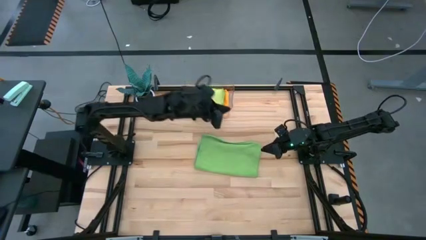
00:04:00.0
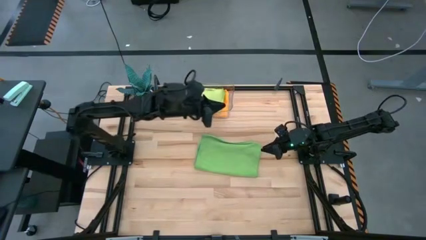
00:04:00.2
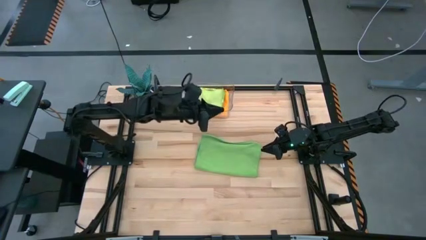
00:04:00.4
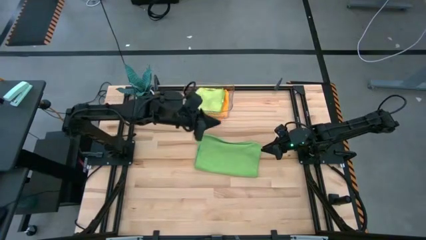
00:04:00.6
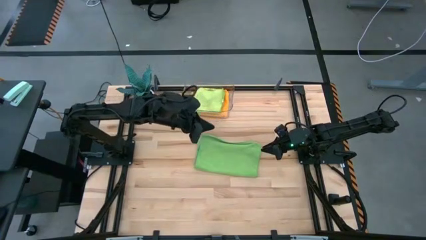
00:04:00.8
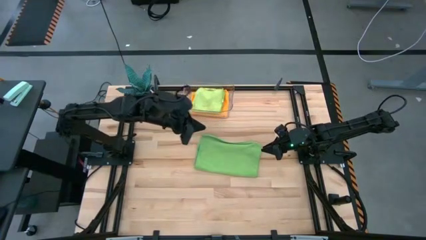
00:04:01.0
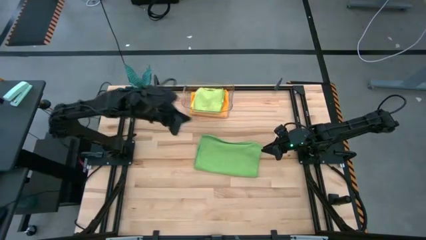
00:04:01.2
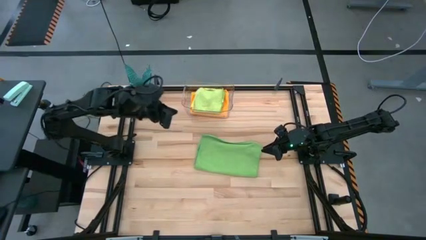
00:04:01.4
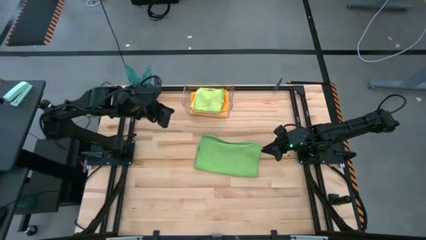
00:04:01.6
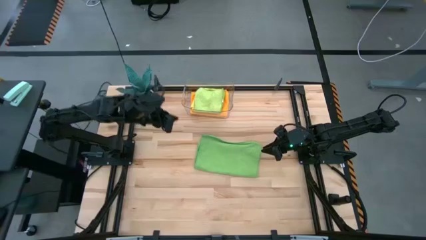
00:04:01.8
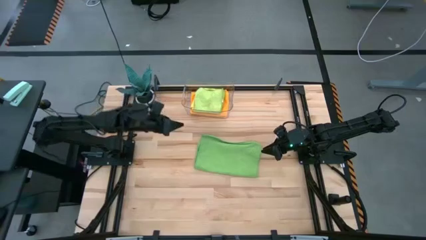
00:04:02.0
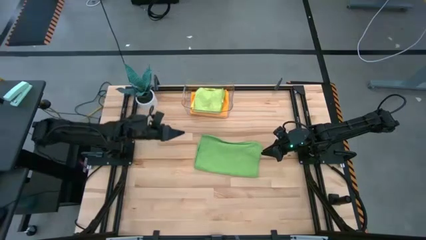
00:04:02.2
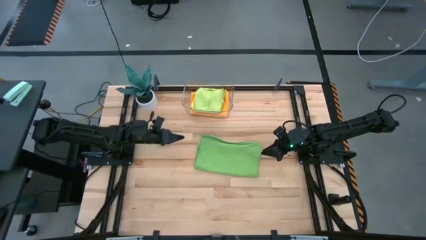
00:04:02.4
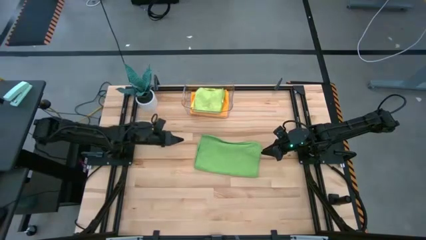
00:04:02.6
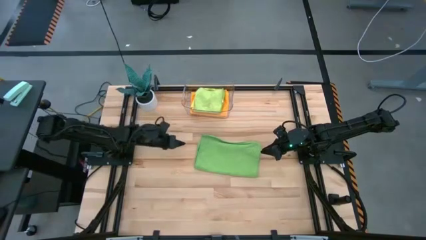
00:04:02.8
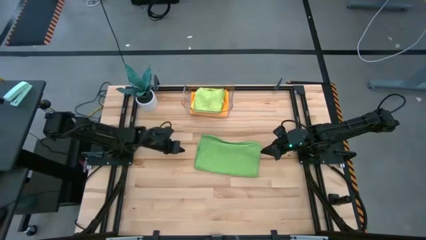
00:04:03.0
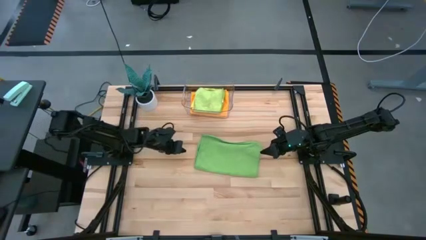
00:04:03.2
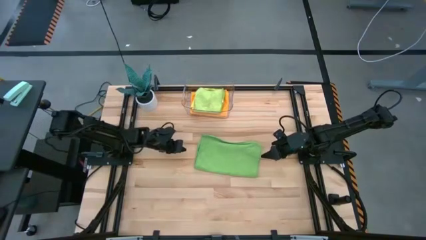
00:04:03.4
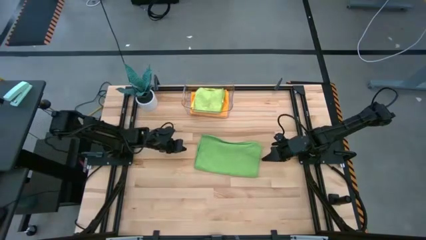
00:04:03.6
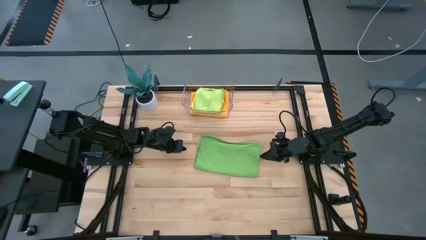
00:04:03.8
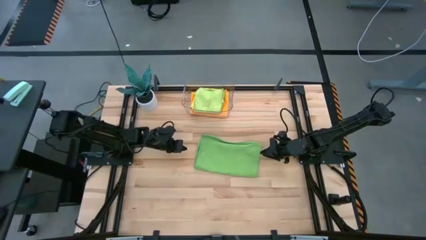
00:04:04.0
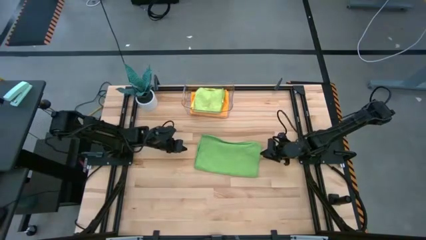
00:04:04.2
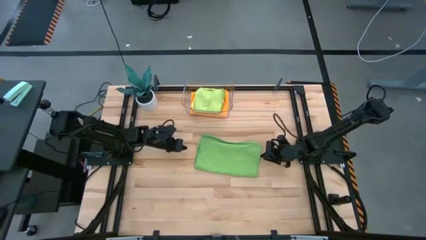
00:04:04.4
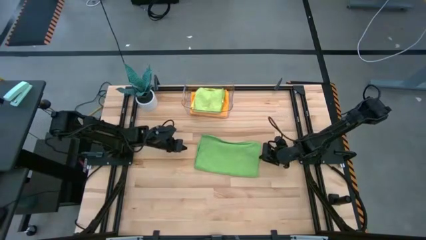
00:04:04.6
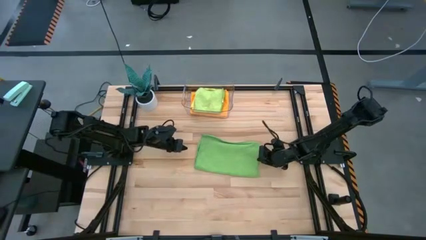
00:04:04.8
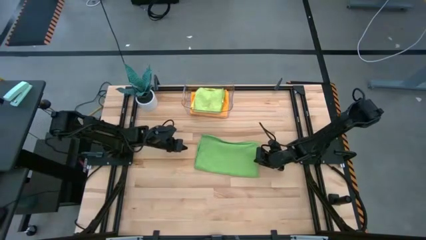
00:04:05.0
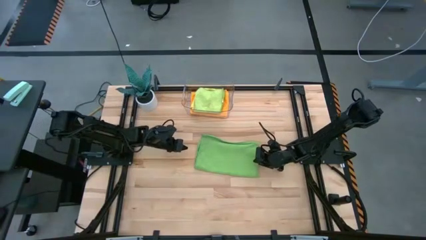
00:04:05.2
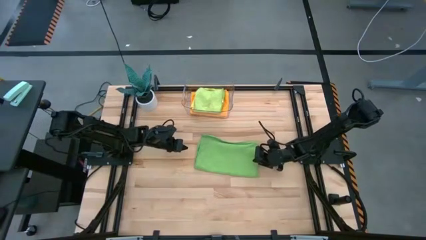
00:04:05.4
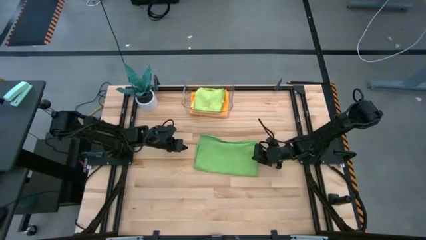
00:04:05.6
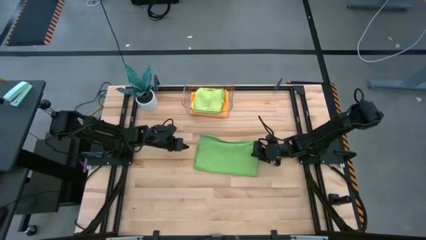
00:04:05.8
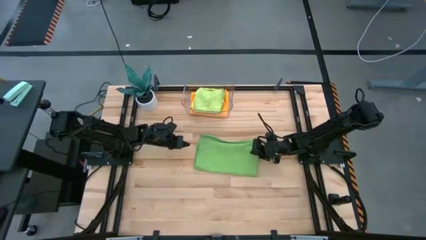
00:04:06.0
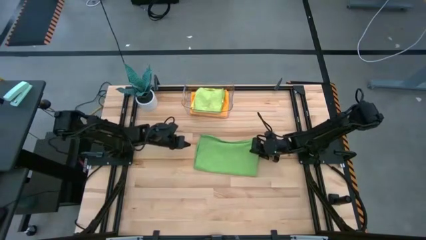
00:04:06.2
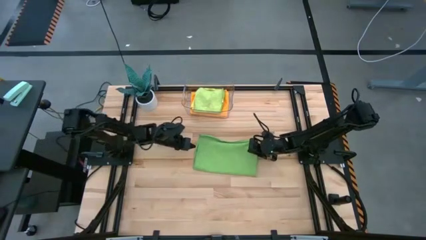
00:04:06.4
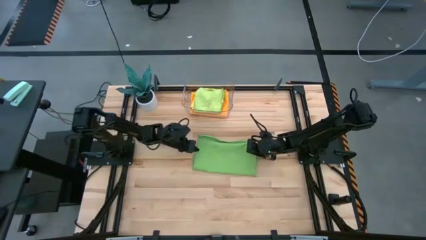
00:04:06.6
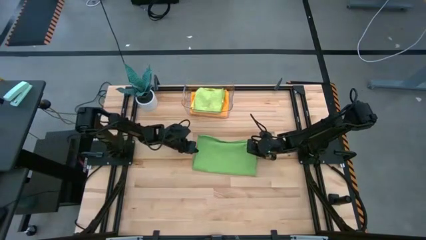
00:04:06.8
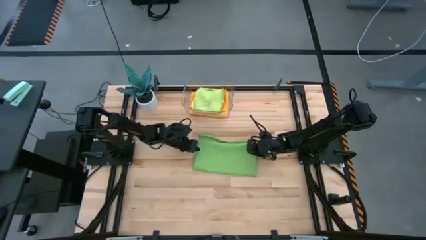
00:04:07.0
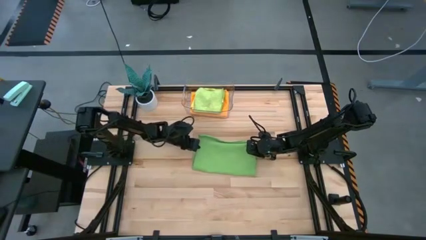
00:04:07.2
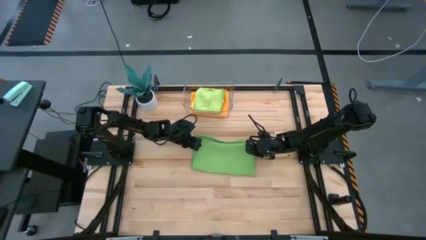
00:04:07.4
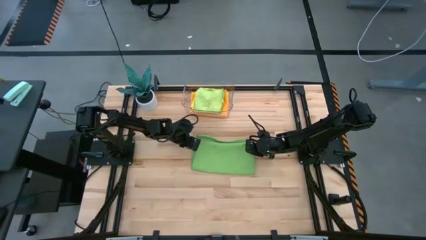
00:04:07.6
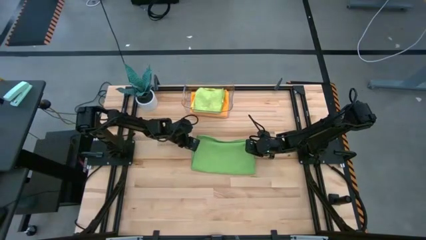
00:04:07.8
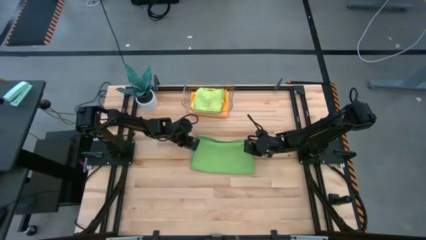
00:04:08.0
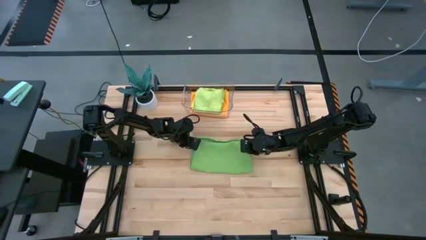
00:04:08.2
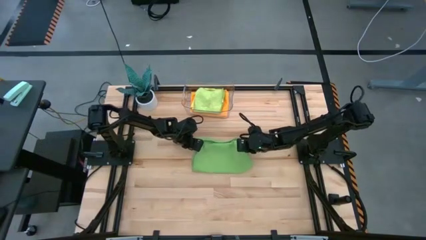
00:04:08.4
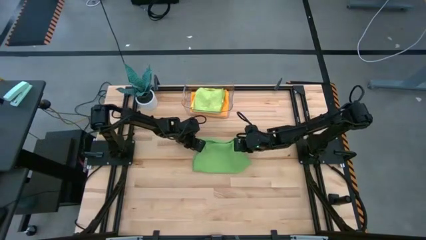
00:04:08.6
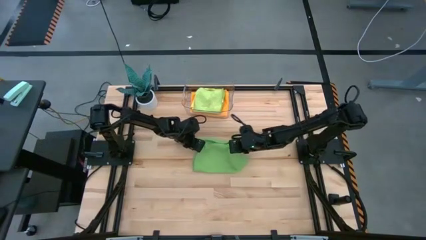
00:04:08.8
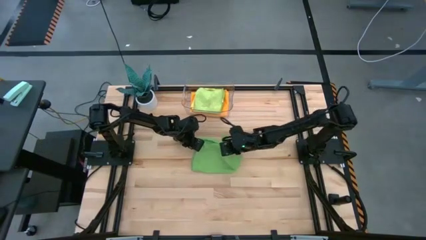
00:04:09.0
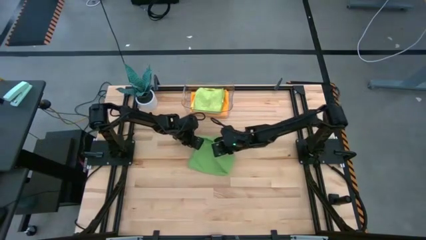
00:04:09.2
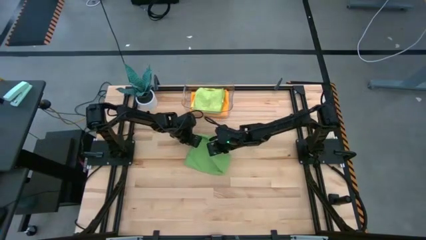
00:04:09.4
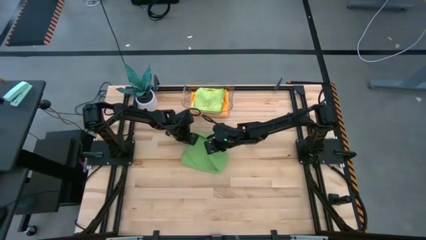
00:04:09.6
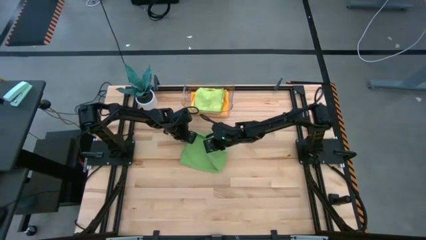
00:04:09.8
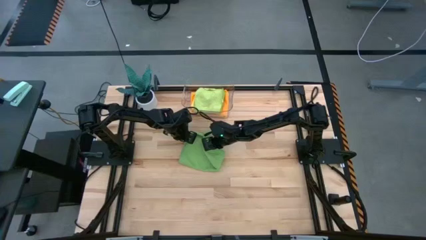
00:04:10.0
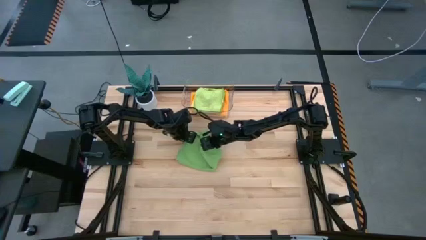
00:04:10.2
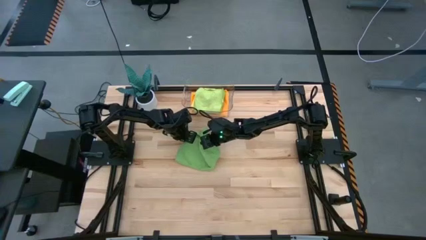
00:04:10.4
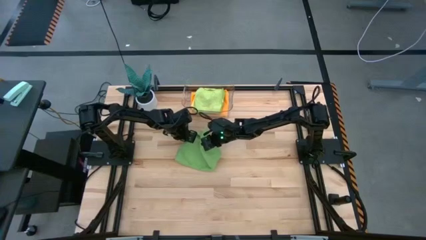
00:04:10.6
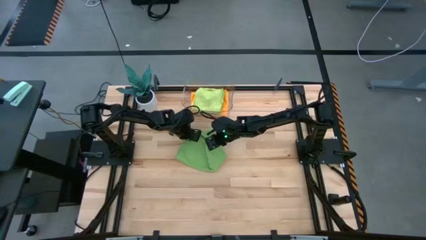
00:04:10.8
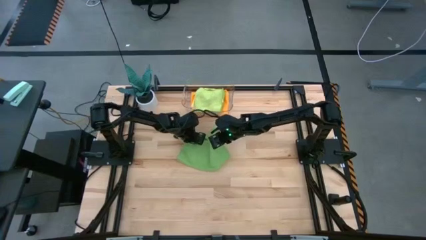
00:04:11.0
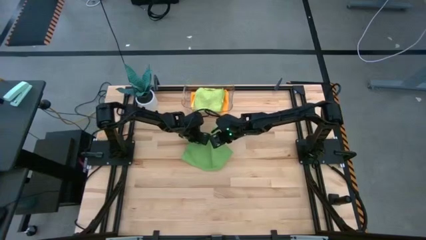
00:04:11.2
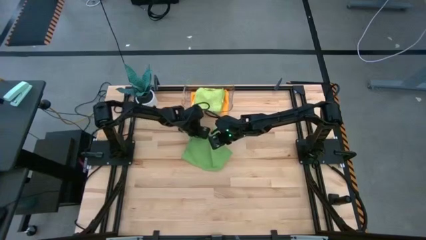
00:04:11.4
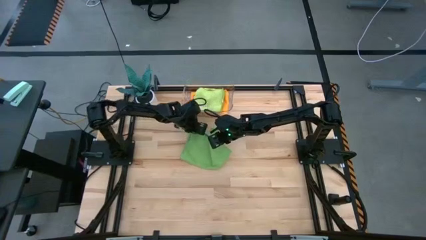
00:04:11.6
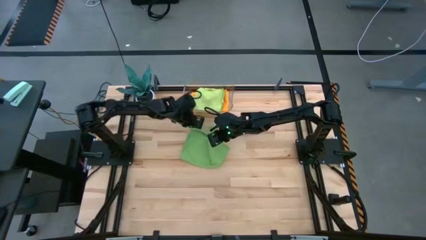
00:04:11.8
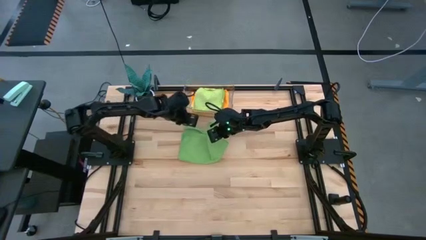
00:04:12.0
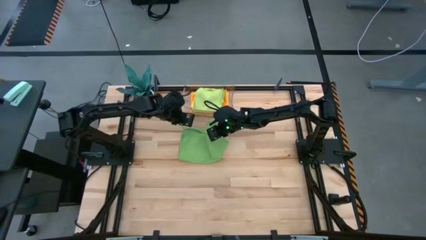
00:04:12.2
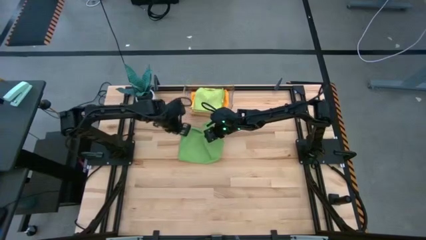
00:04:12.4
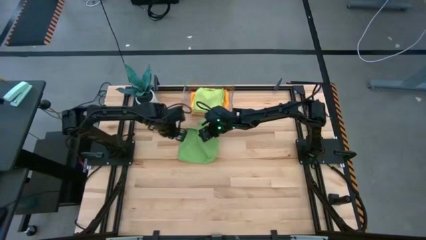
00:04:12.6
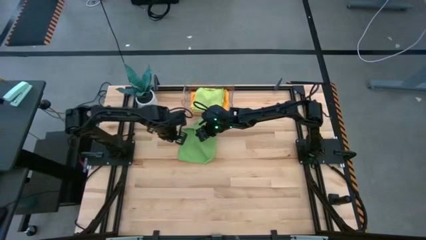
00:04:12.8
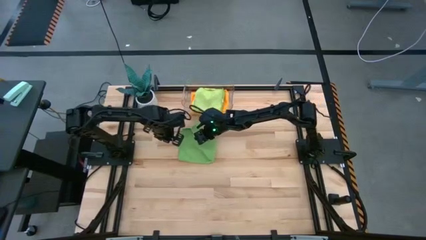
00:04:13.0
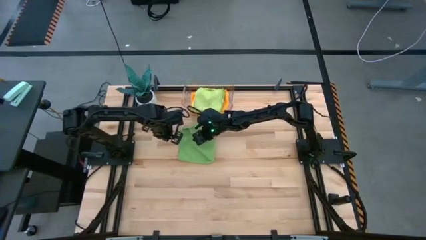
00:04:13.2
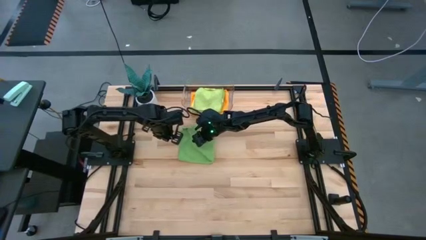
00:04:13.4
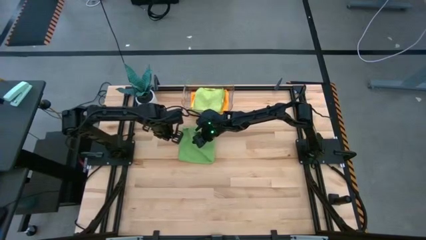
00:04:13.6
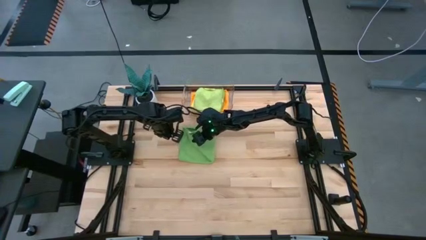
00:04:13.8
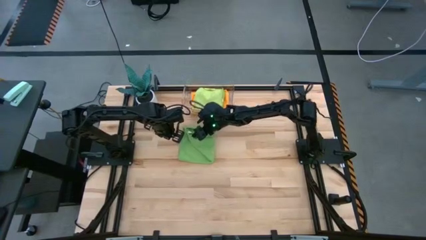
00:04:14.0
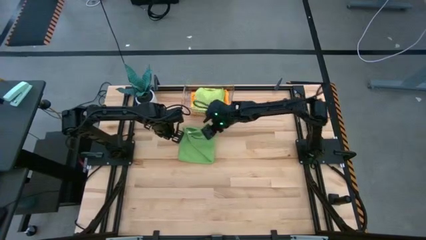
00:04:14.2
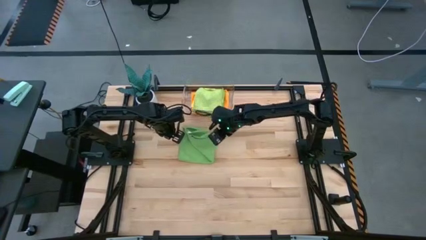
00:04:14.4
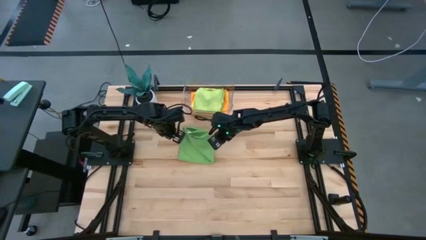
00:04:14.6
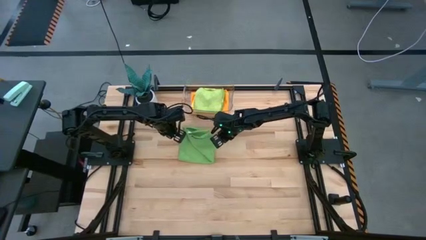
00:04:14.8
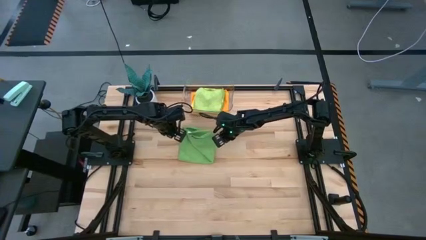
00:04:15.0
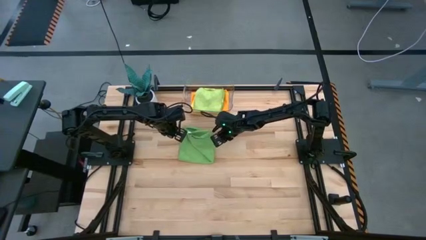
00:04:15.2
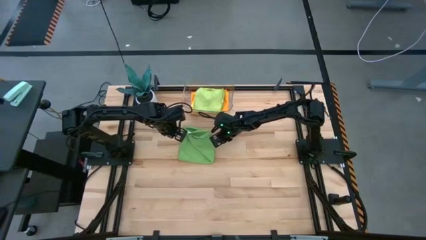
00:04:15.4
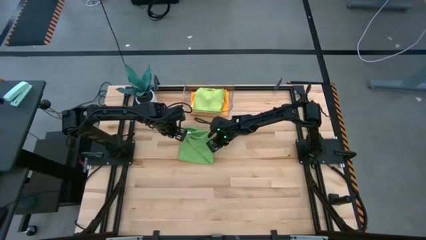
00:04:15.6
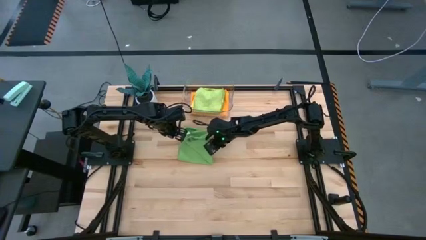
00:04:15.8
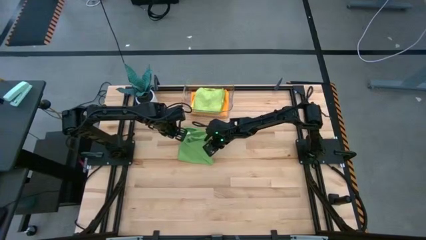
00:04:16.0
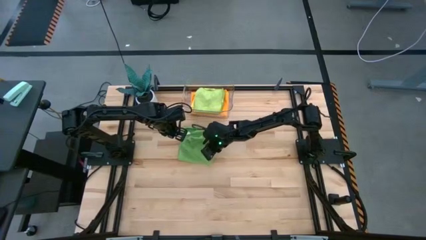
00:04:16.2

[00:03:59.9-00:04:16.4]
Task: Fold microfiber towels
Fold the green towel
